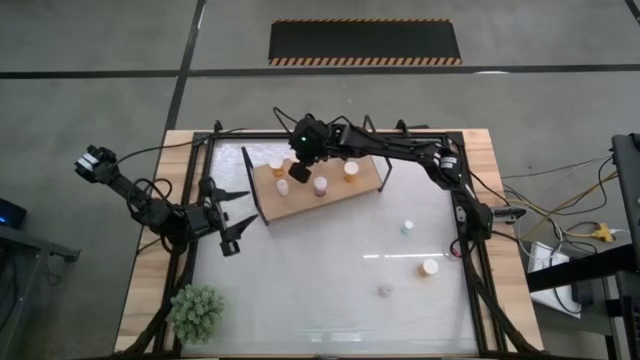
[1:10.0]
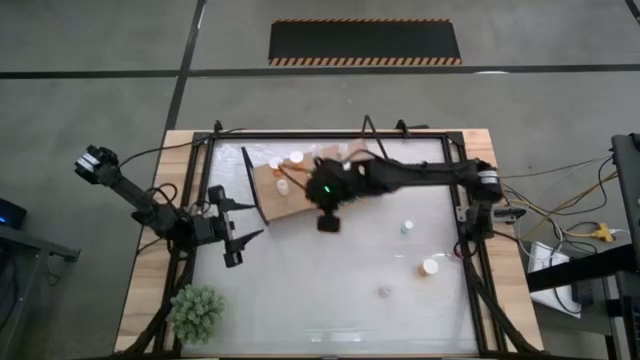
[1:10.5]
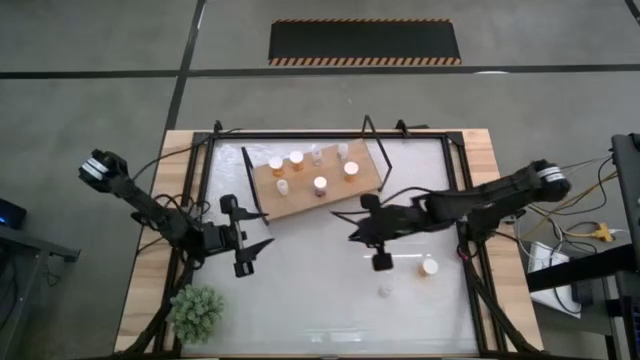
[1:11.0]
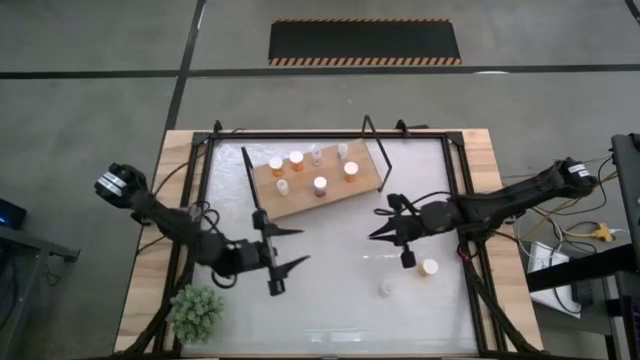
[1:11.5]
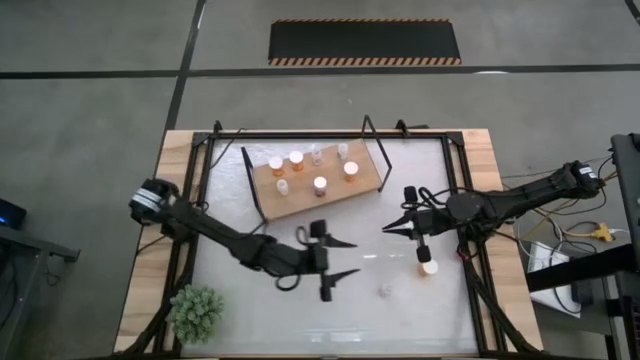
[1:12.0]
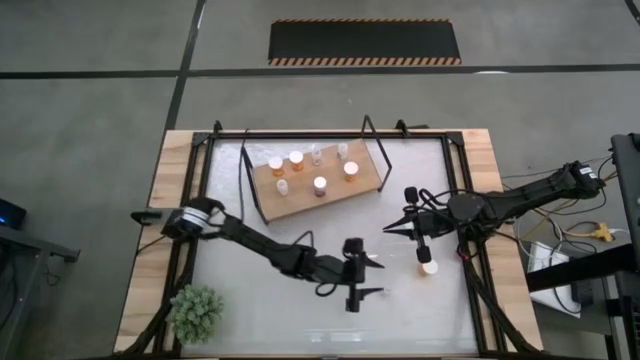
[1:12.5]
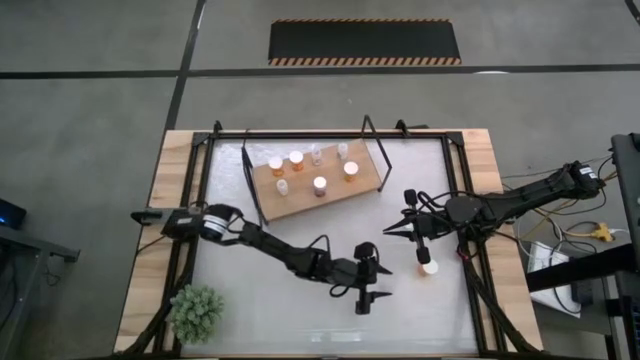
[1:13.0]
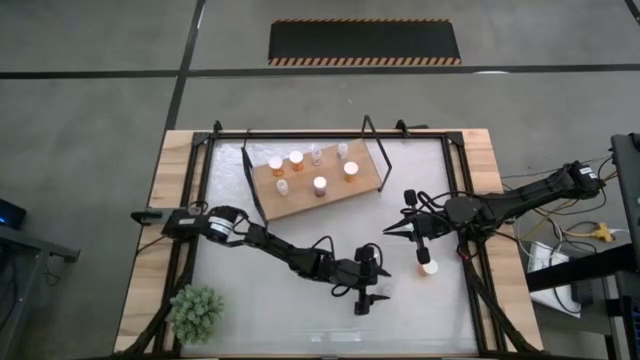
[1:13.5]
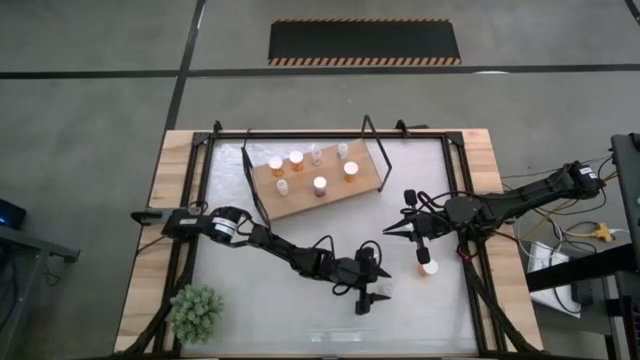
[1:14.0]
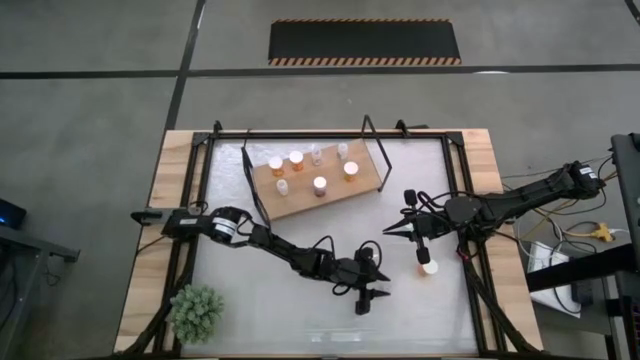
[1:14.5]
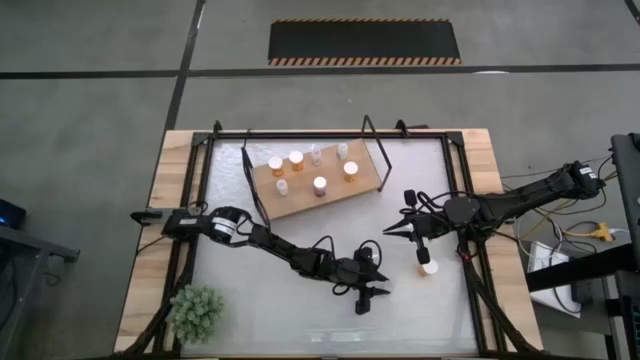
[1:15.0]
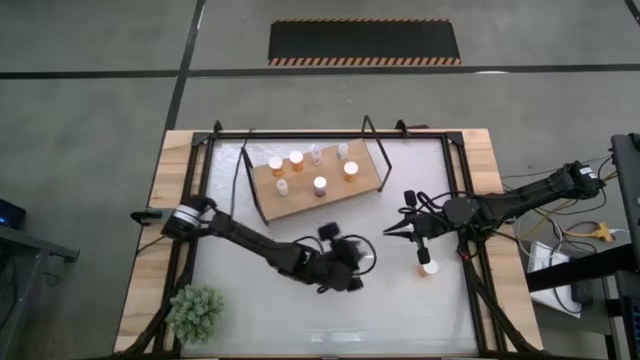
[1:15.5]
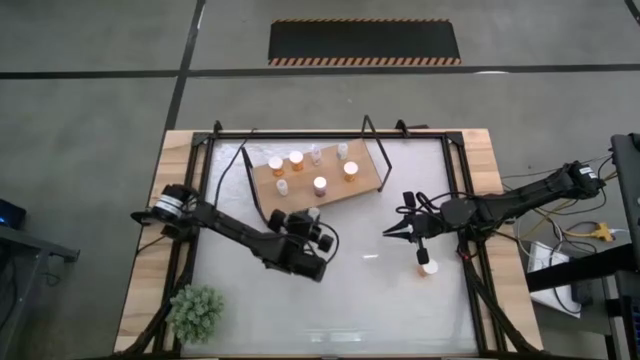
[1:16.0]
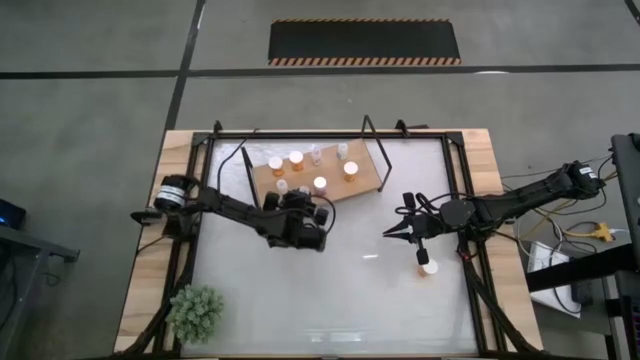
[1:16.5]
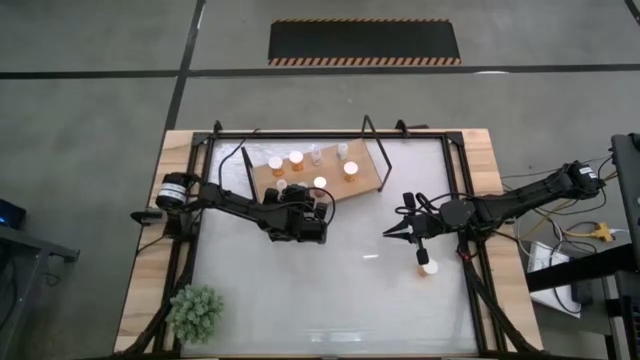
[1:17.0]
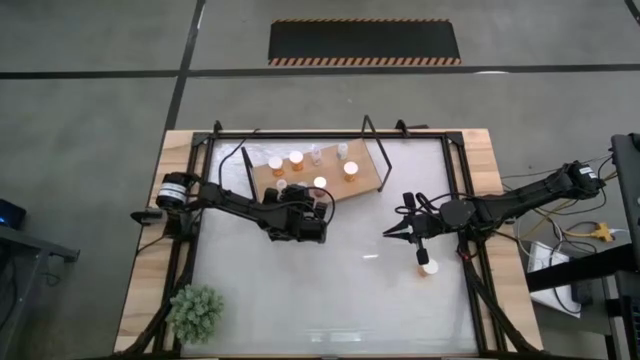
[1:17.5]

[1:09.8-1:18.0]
Task: Pick and place medicine bottles onto shelf by color
Put the green pill bottle on the shelf

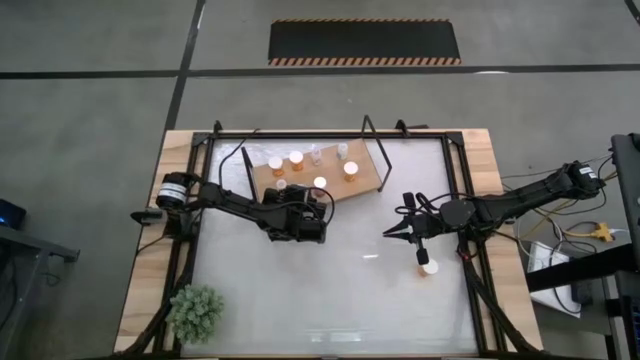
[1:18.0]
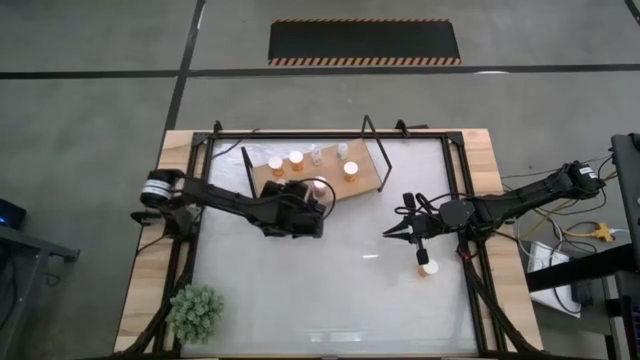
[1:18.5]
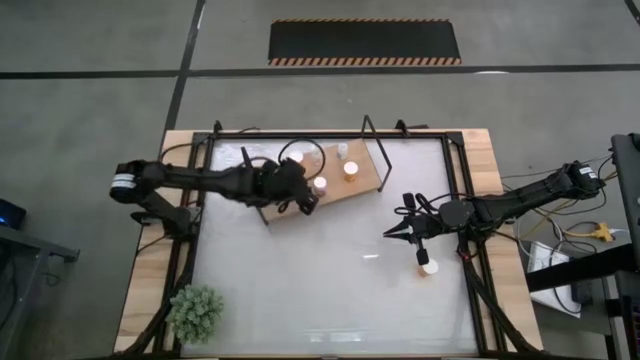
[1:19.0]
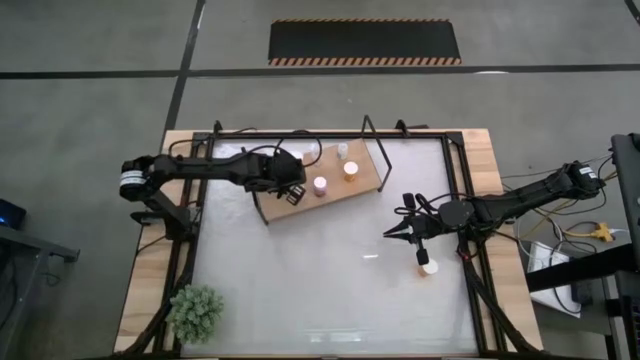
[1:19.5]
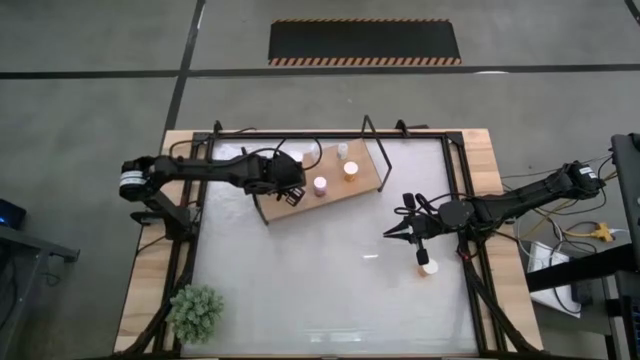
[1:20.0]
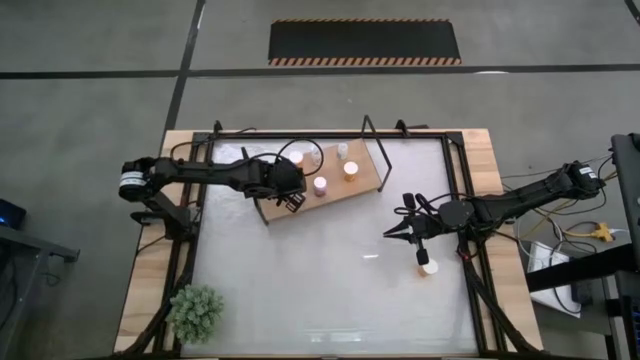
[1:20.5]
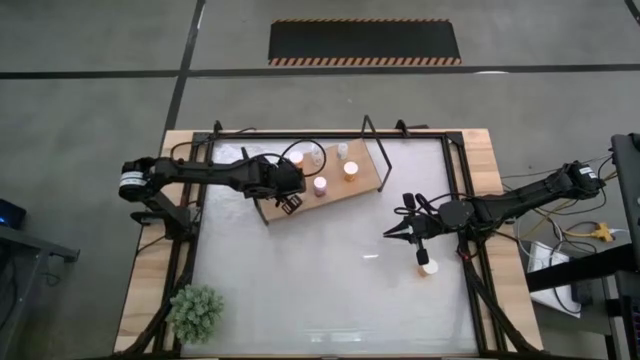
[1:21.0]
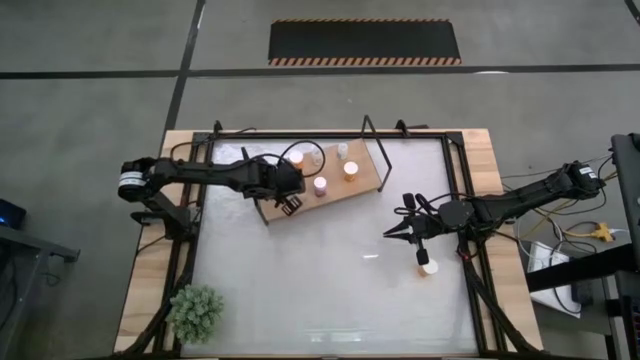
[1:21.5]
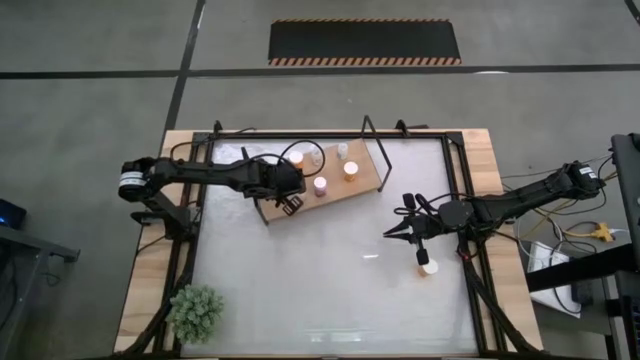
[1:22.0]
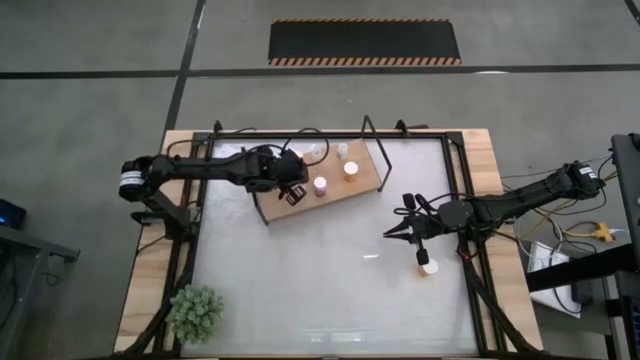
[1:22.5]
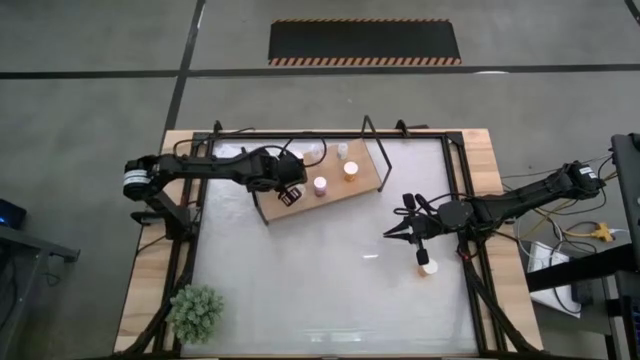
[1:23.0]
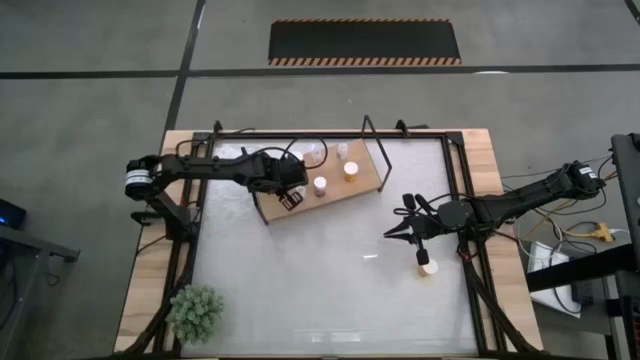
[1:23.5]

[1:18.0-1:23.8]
Adjust the yellow pill bottle on the shelf

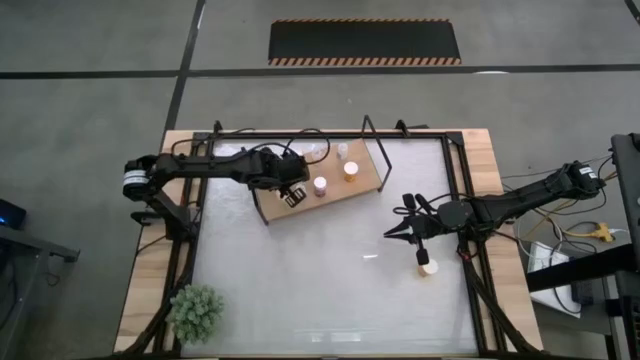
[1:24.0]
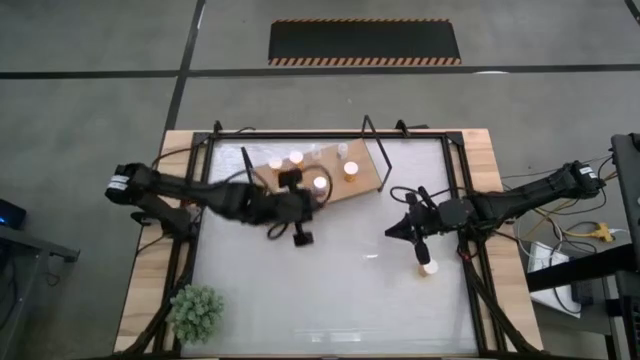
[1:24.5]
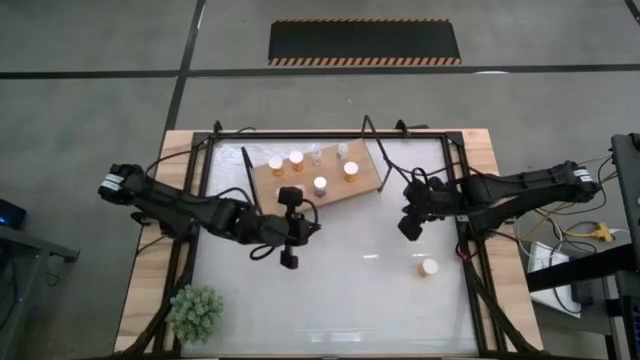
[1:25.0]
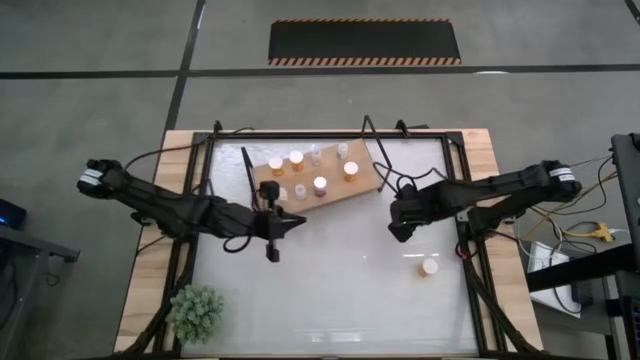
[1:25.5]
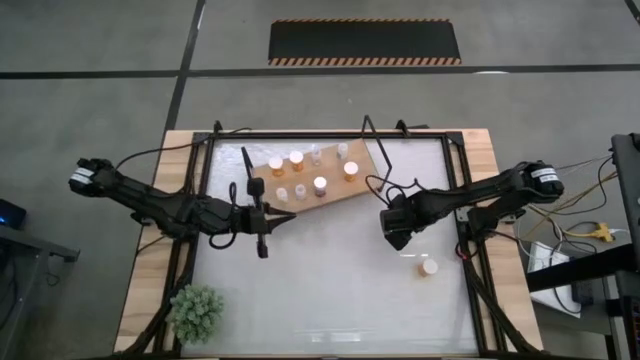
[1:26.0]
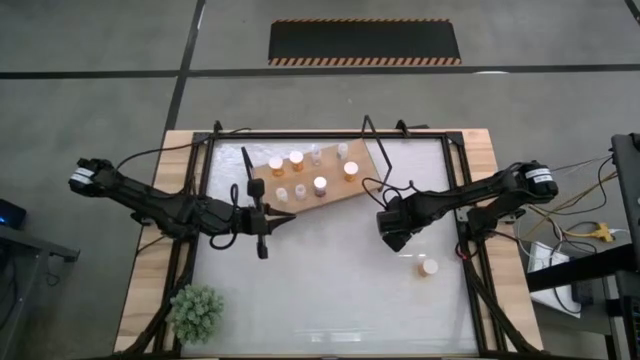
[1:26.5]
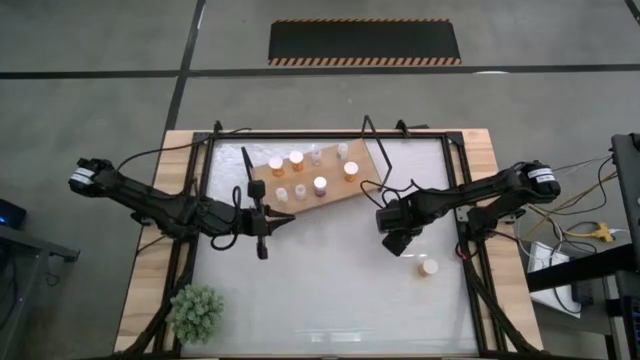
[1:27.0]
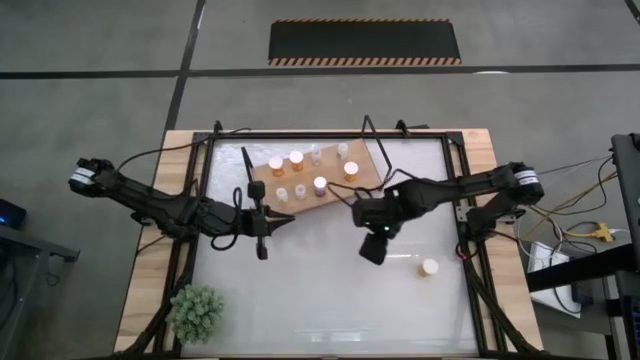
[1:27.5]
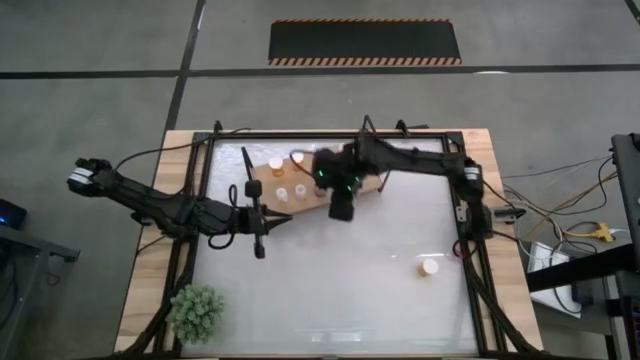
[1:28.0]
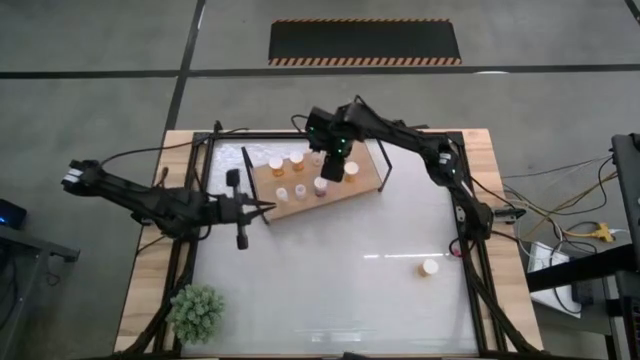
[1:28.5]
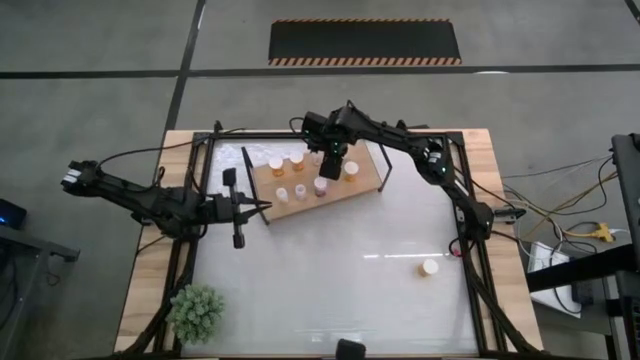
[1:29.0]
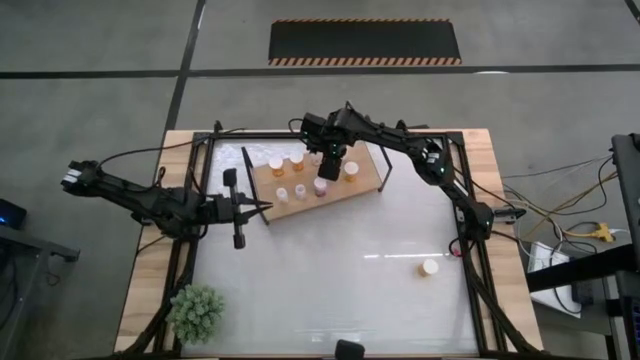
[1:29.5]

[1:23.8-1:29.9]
Put the green pill bottle on the shelf
